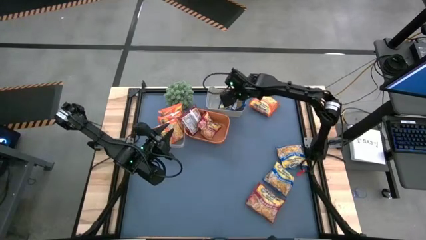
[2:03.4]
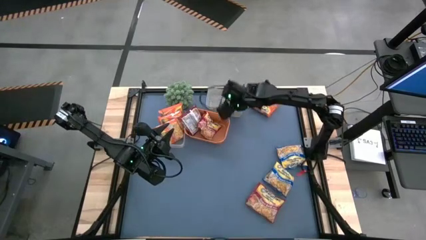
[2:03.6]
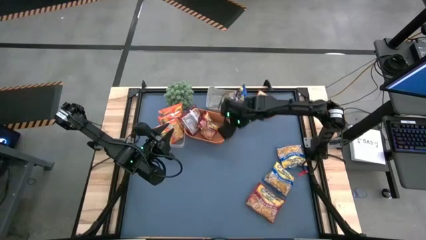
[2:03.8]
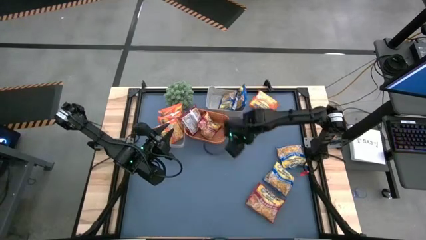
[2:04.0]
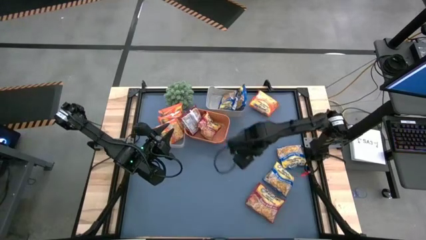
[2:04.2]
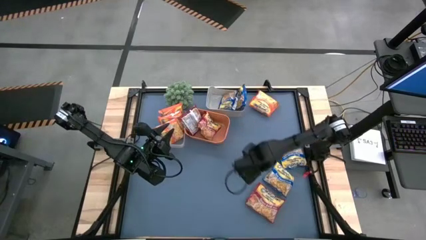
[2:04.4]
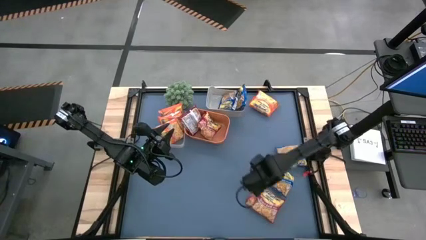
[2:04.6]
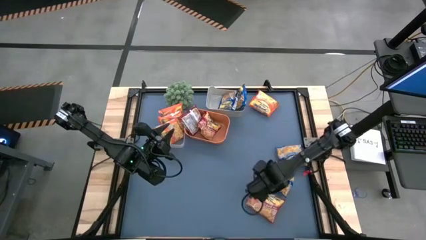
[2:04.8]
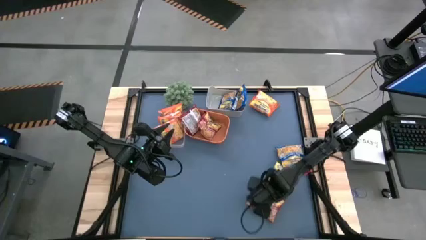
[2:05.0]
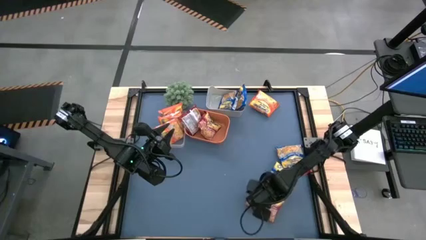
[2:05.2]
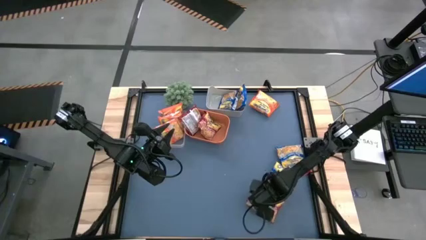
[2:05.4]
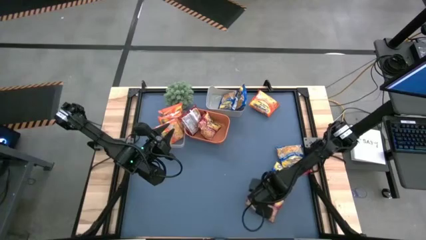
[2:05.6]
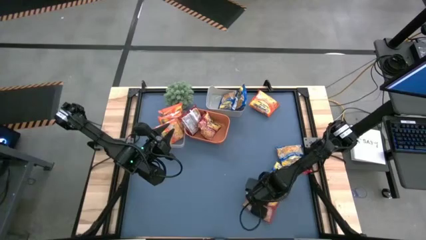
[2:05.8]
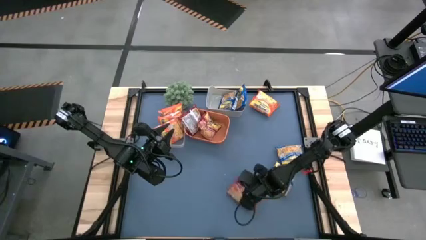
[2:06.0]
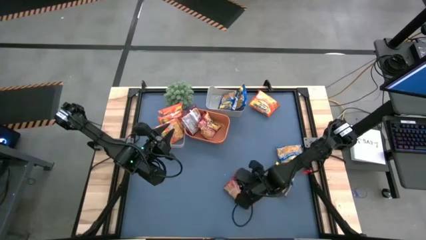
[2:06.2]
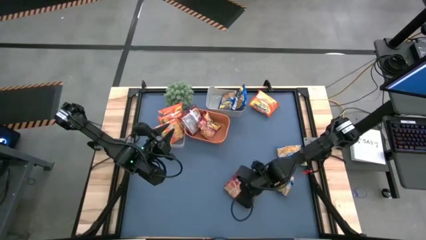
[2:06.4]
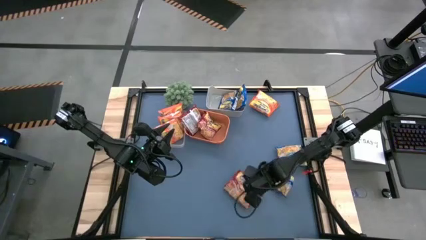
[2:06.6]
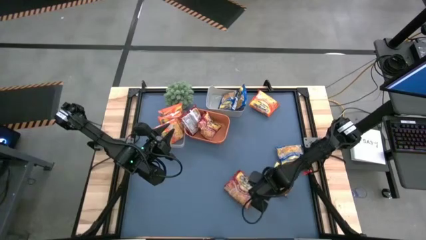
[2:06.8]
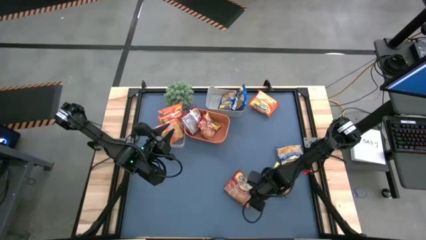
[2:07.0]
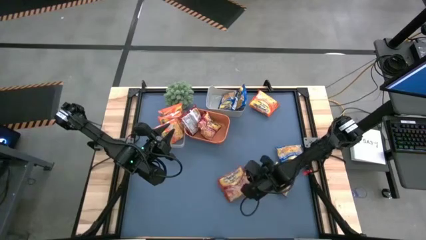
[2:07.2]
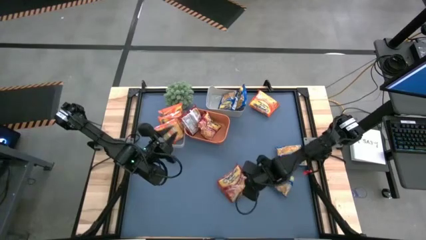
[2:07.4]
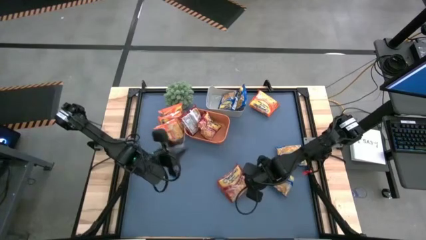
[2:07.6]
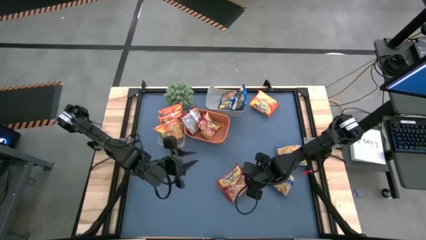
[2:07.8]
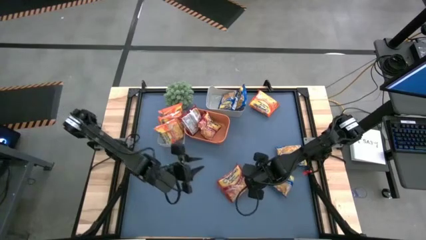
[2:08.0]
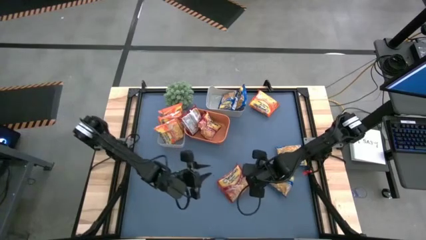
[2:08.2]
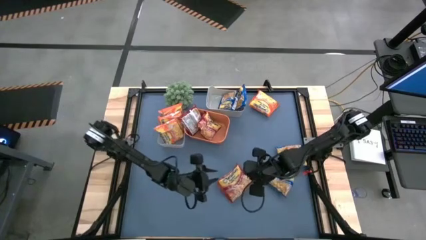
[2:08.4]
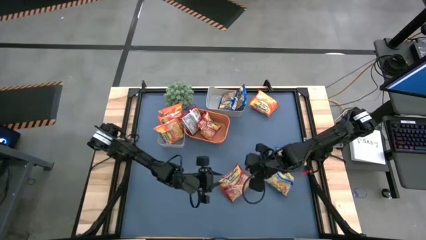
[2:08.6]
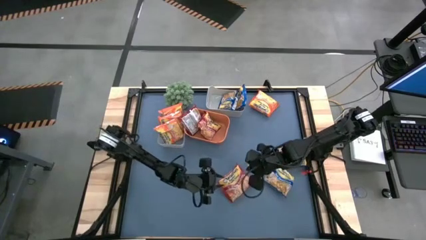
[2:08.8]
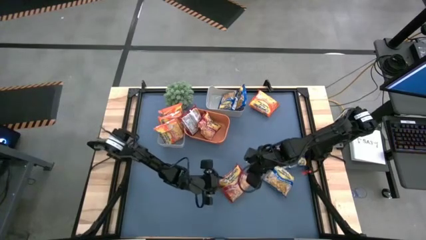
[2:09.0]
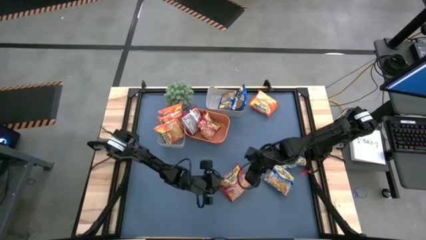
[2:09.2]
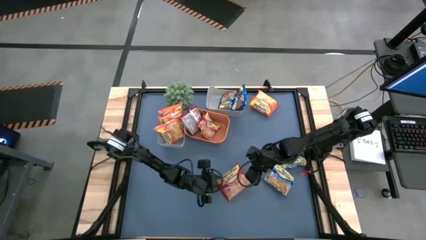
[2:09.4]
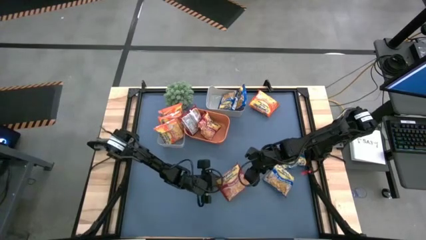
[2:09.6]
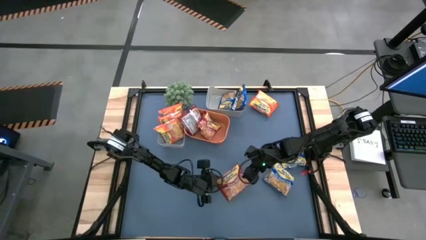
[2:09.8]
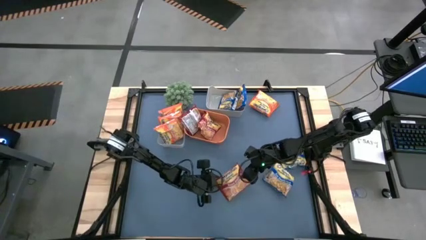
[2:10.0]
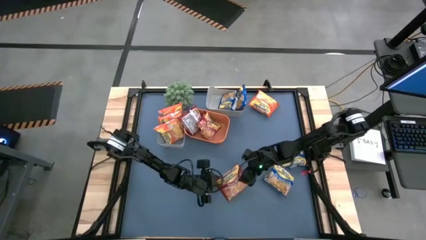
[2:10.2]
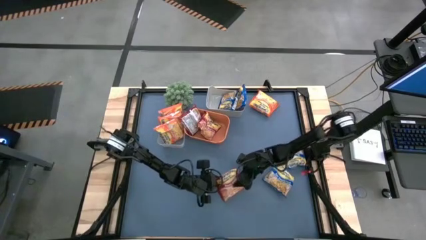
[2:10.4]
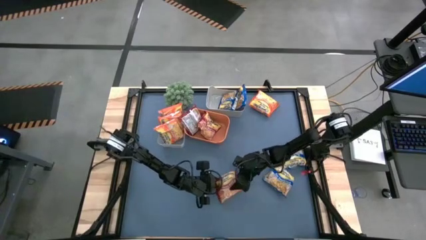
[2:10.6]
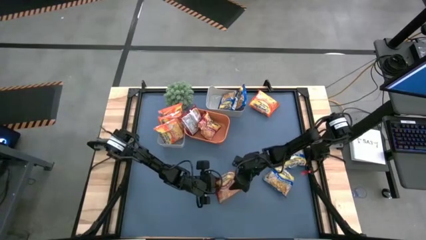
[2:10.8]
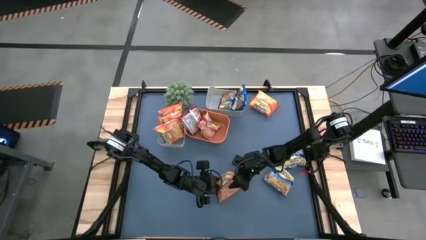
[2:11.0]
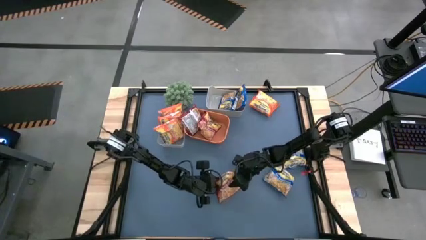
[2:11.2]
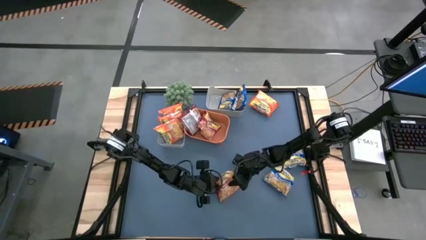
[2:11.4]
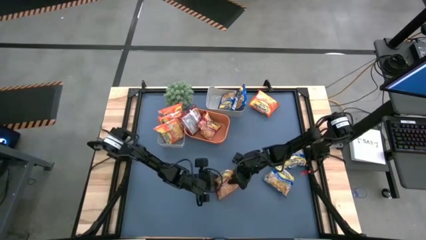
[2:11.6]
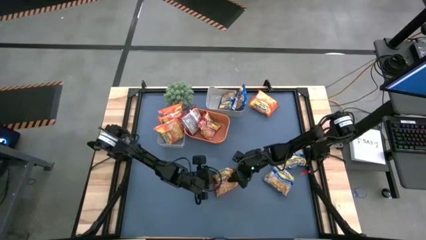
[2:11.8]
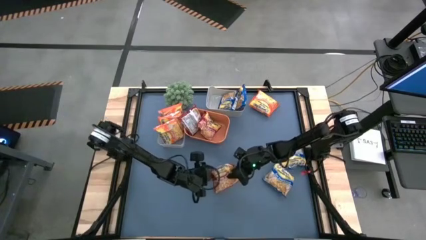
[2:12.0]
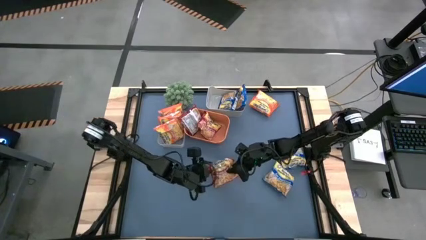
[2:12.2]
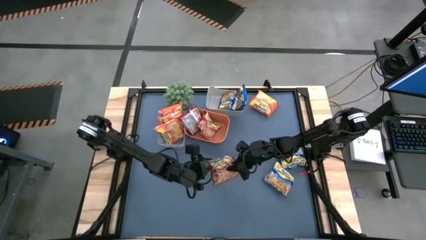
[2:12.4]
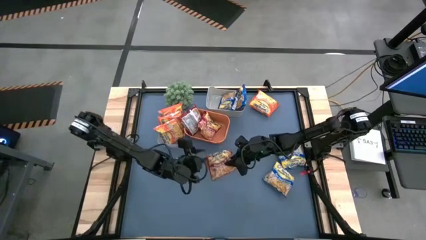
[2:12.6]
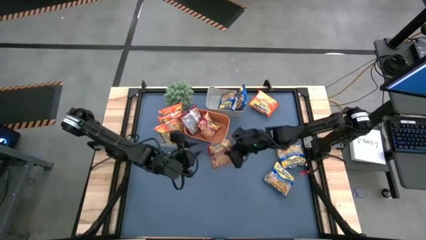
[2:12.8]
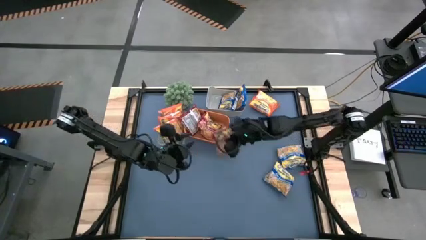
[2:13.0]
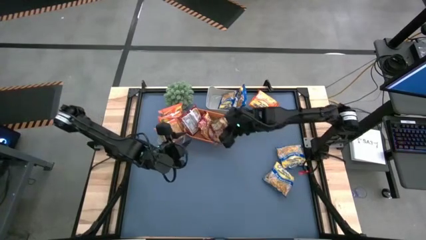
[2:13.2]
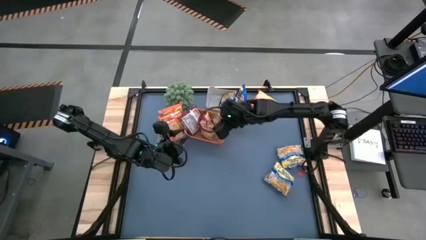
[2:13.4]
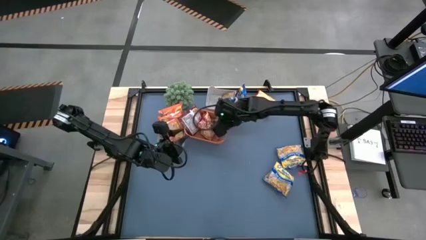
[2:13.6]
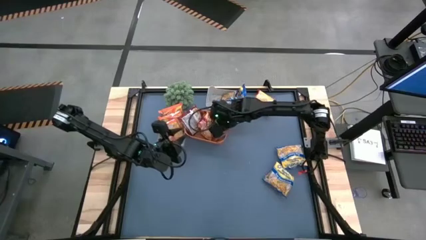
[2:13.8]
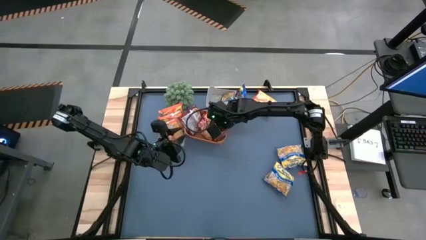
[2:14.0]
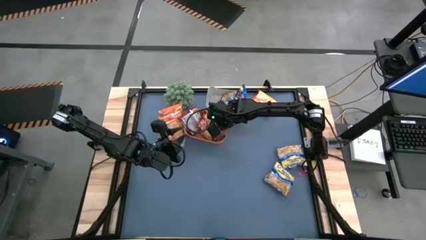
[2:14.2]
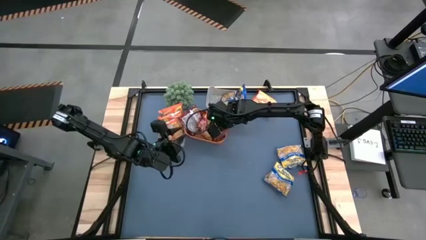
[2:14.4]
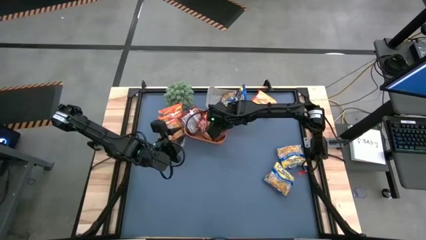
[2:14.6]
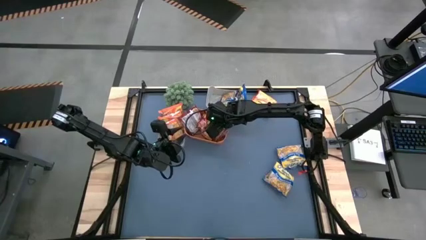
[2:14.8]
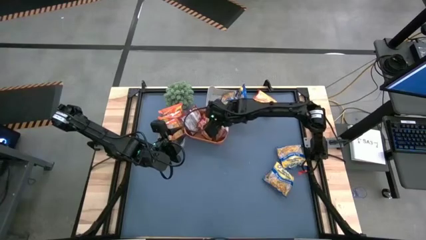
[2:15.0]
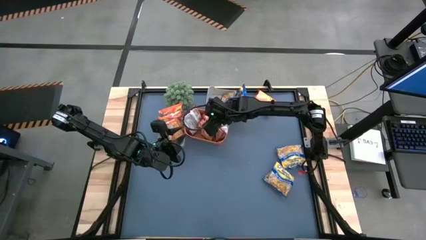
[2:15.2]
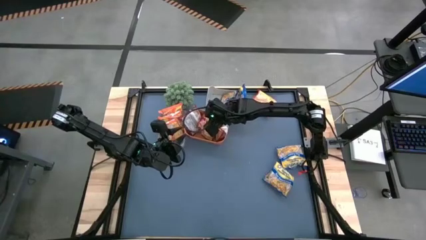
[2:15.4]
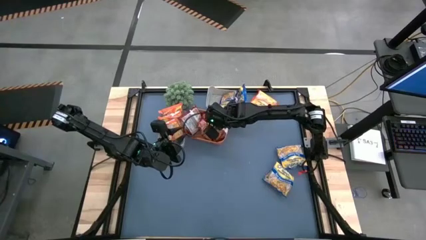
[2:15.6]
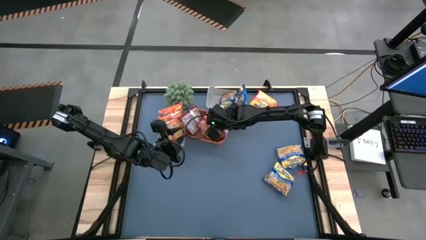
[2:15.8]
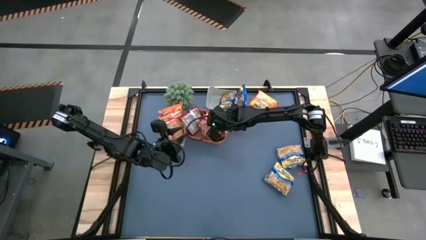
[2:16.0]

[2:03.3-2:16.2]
Task: Sort Maruchan noodles
Put the red noodle pack into the orange bin

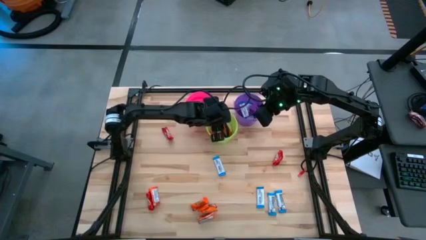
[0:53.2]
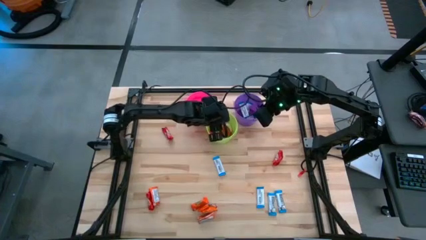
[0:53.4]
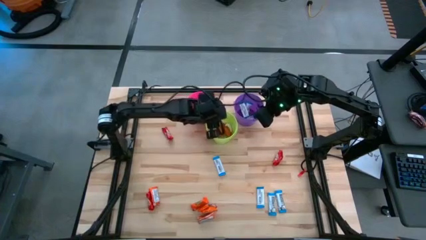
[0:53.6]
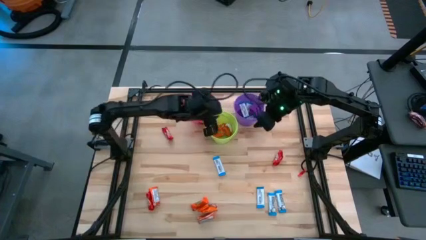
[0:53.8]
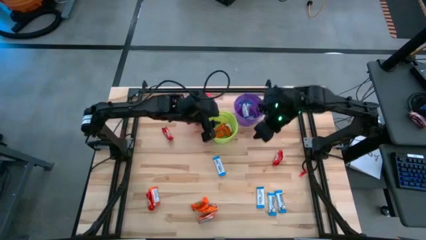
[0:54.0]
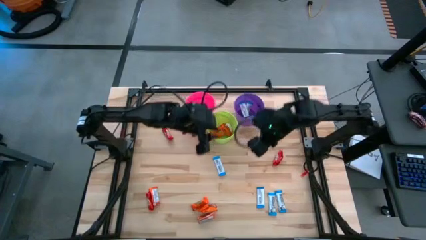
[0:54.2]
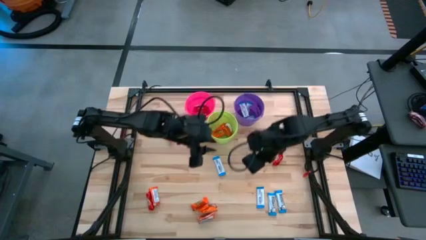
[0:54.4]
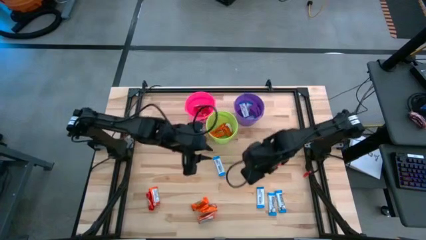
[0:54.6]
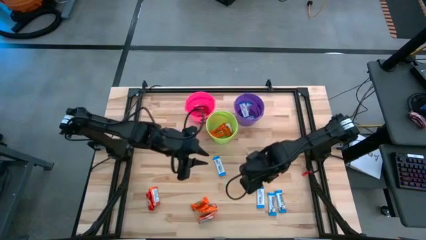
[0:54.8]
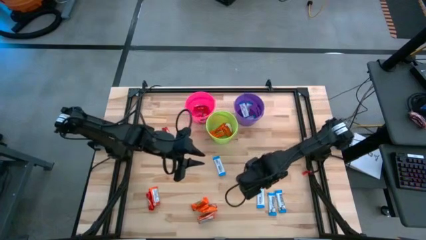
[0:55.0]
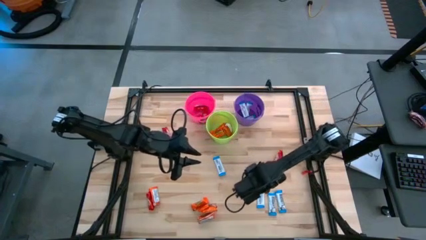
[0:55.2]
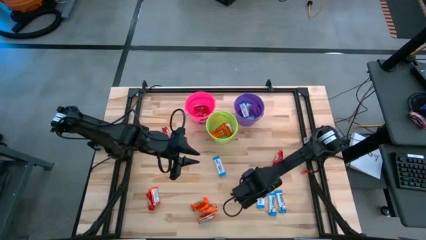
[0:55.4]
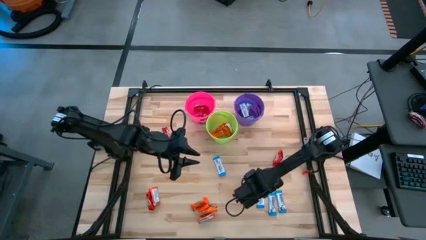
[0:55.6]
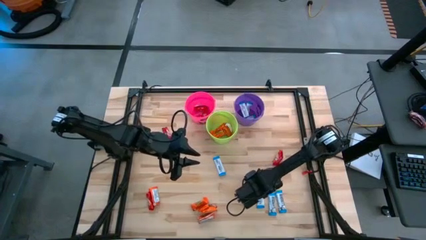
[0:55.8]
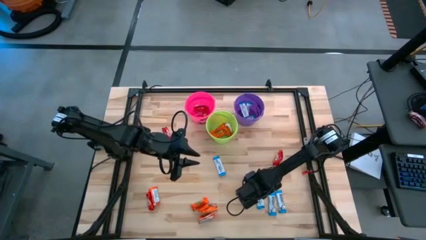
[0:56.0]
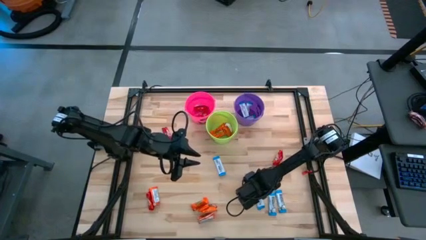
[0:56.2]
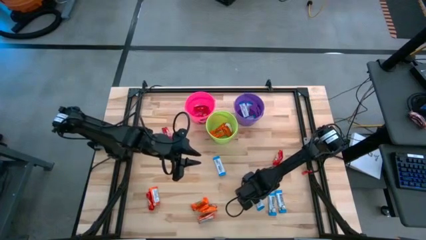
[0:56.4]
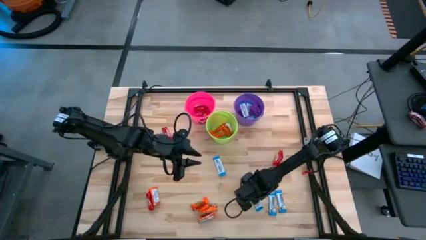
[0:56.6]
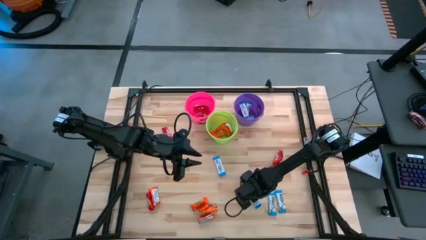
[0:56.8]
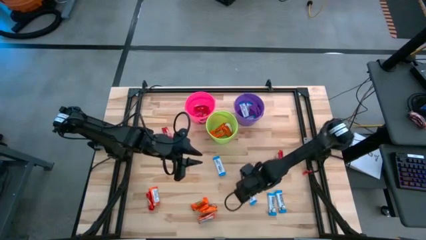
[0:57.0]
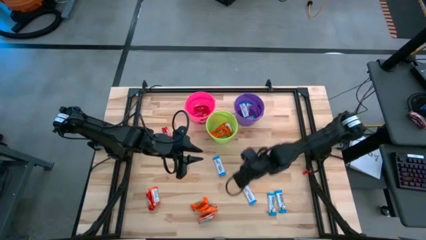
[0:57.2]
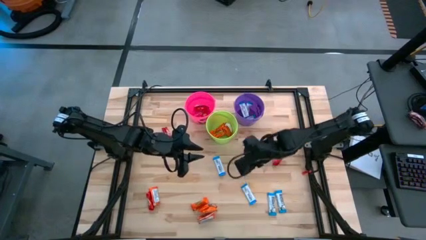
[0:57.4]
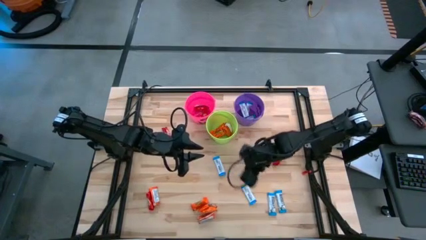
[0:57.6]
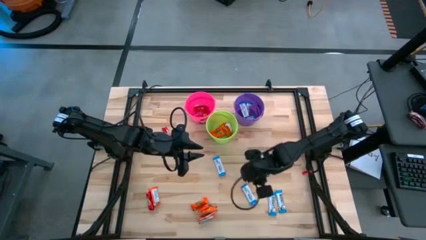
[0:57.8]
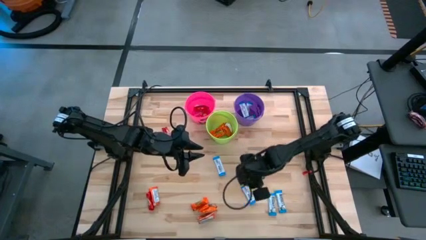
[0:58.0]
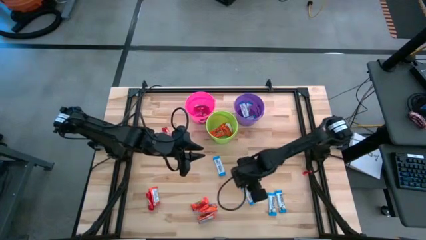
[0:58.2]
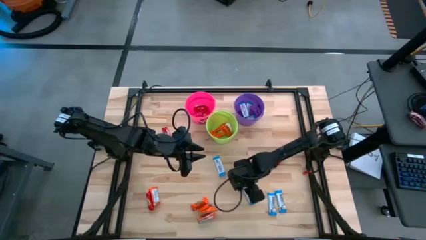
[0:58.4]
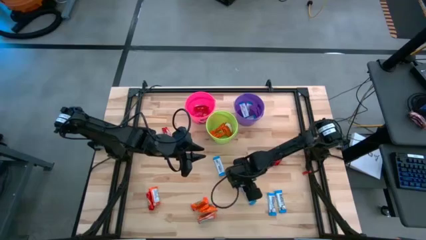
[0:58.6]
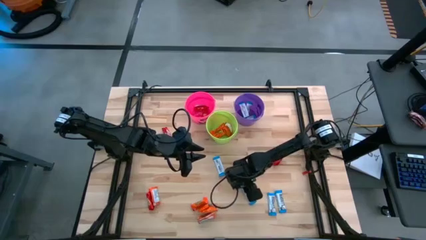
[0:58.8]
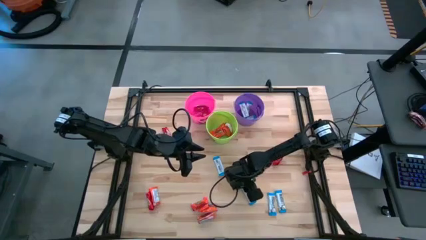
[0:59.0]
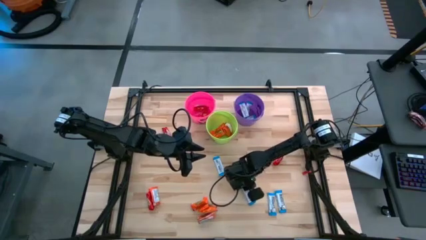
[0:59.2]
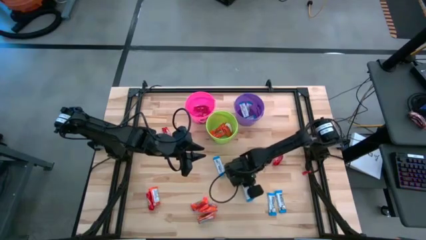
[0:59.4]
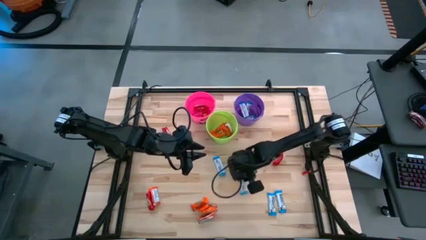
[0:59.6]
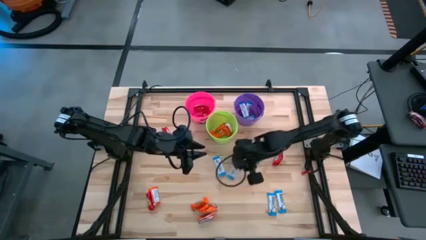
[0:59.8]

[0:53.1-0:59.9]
Task: Sort candy
Put the blue candy into the violet bin
